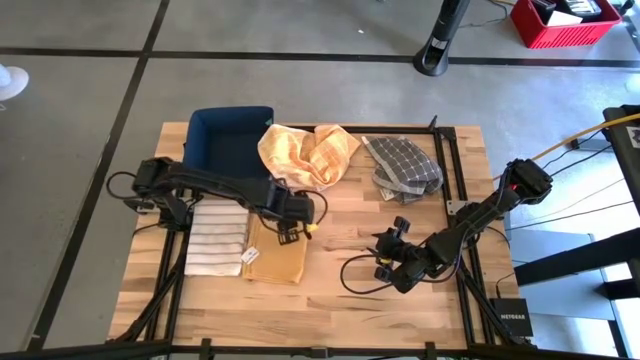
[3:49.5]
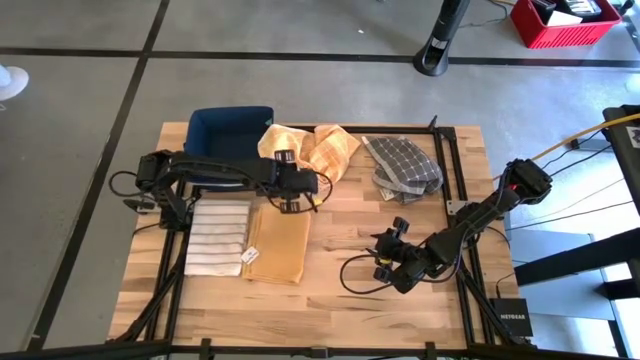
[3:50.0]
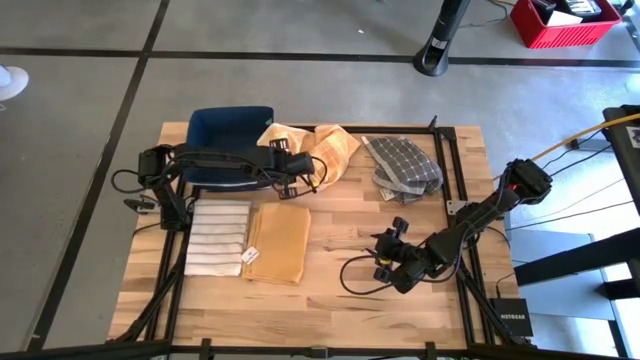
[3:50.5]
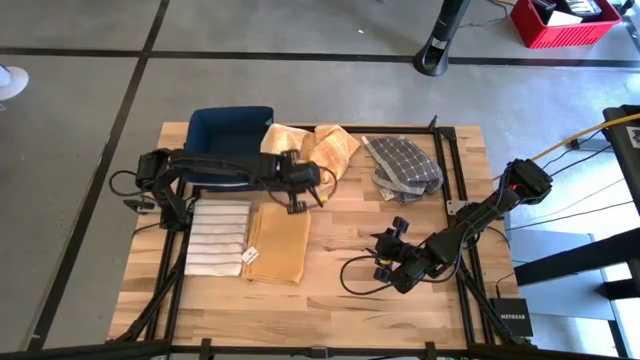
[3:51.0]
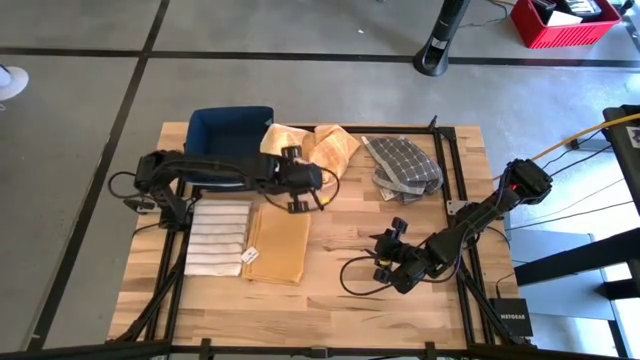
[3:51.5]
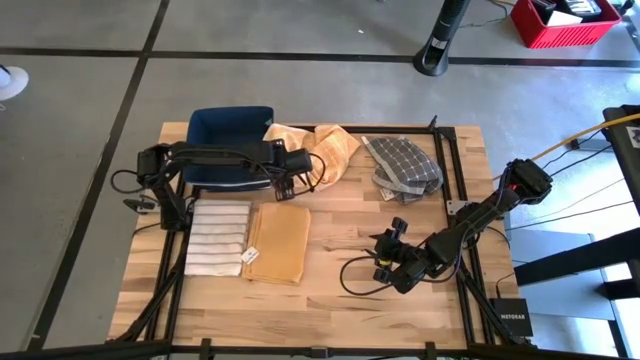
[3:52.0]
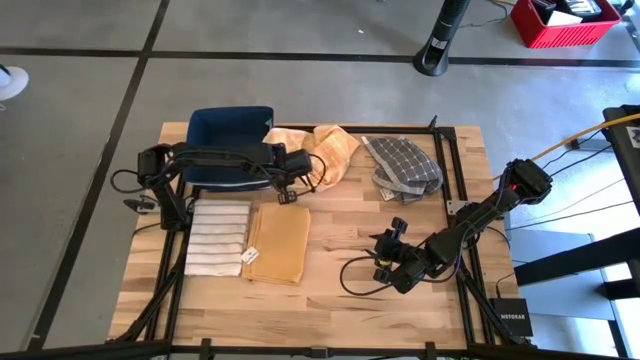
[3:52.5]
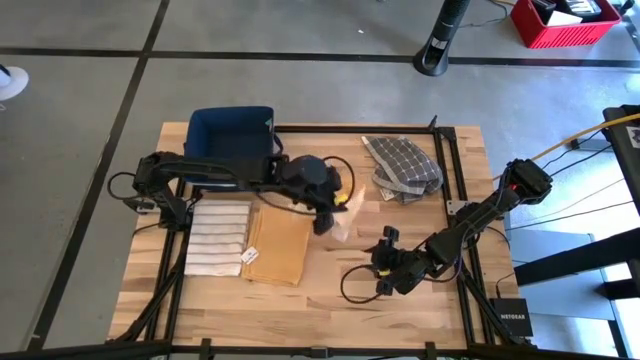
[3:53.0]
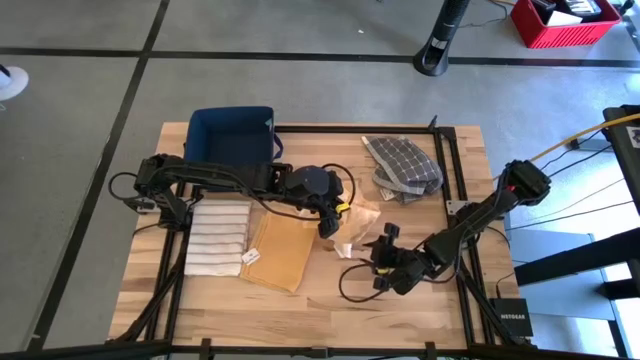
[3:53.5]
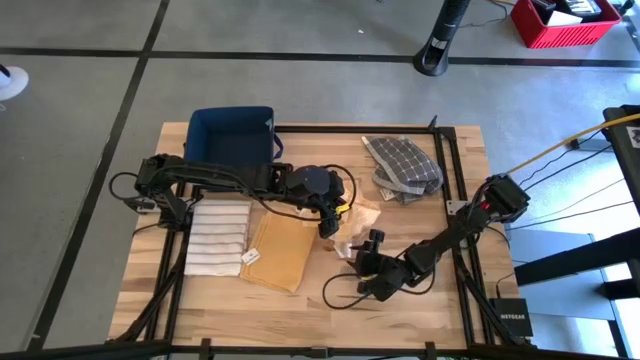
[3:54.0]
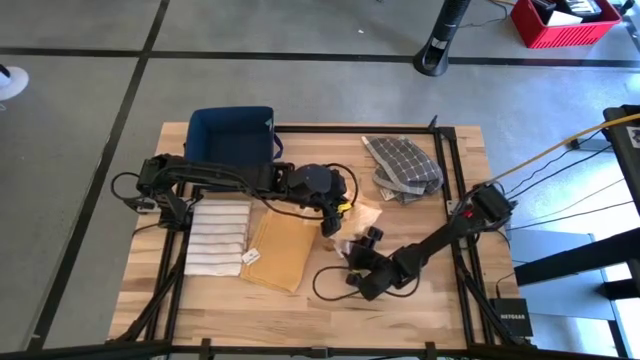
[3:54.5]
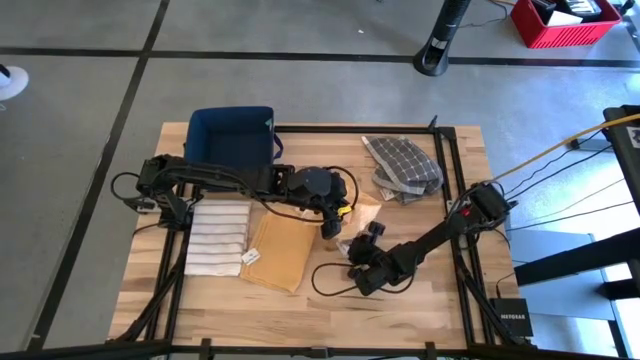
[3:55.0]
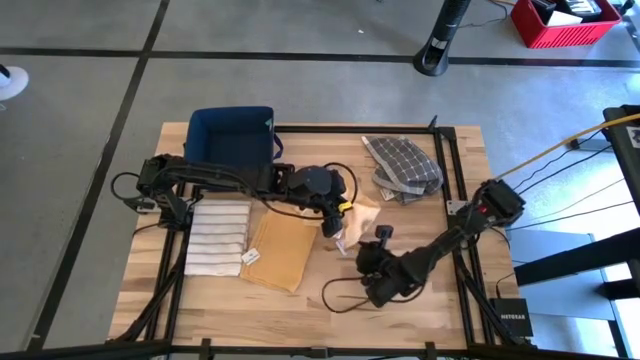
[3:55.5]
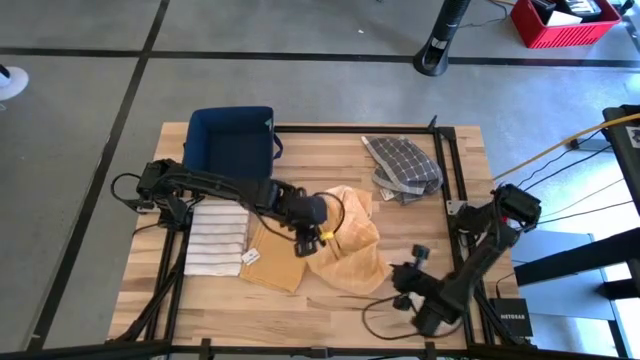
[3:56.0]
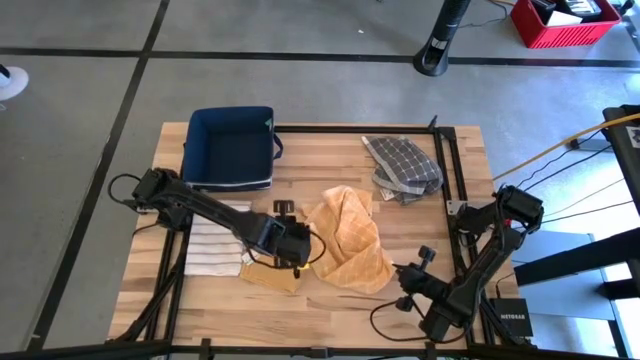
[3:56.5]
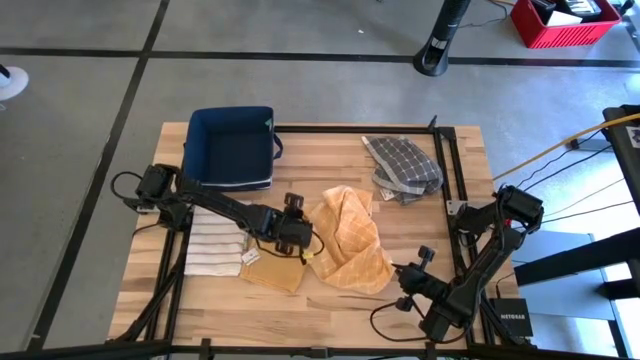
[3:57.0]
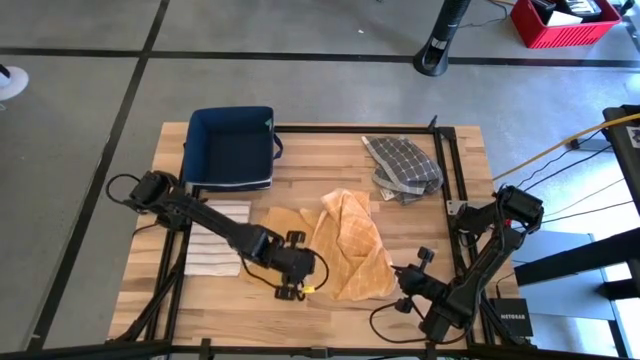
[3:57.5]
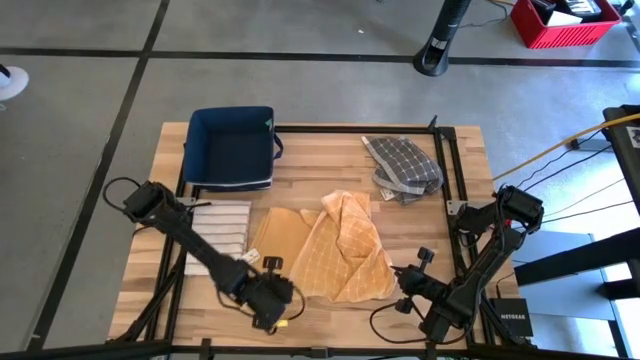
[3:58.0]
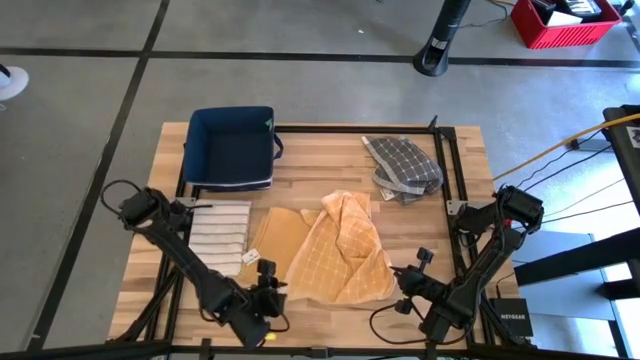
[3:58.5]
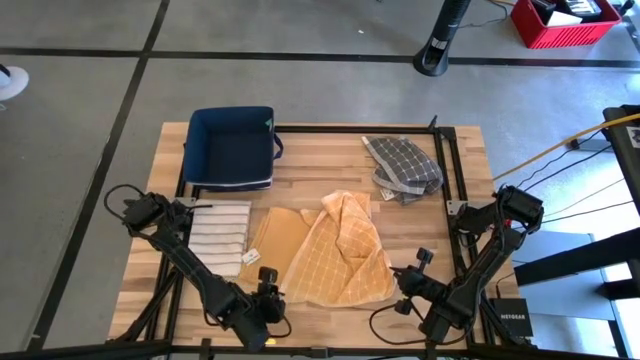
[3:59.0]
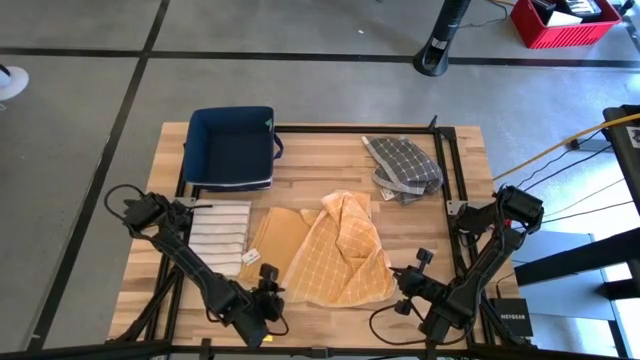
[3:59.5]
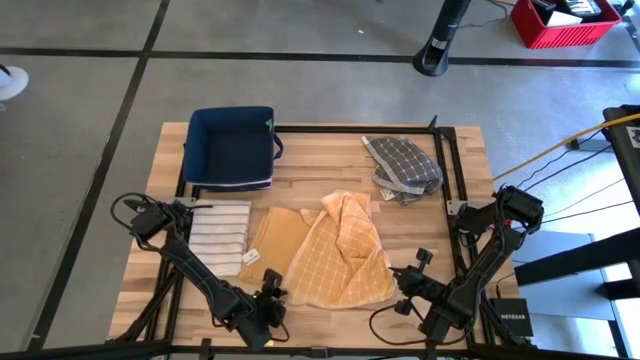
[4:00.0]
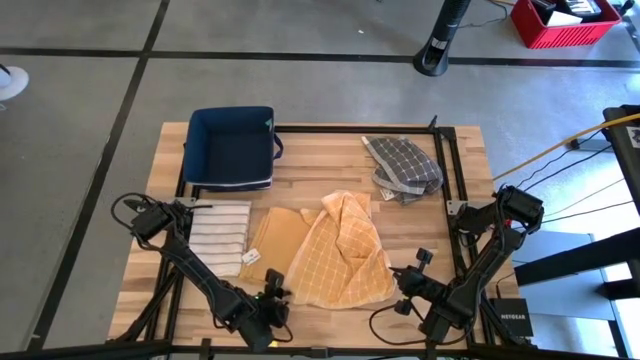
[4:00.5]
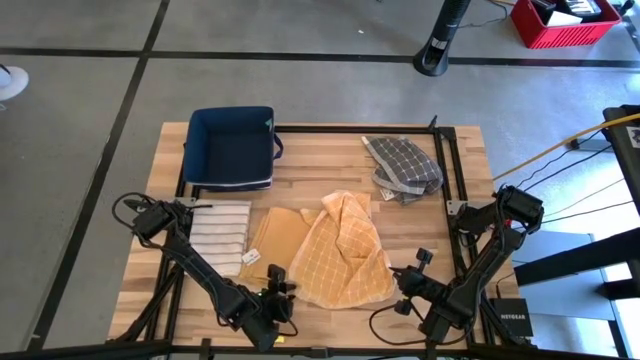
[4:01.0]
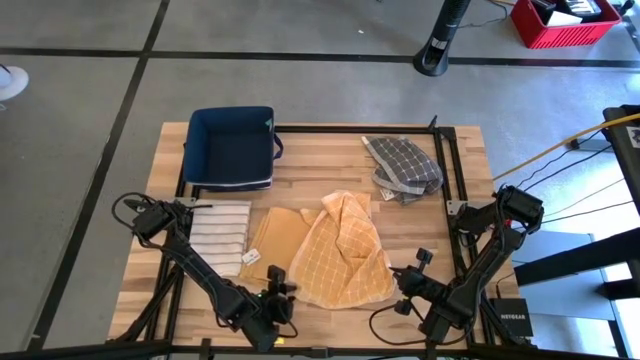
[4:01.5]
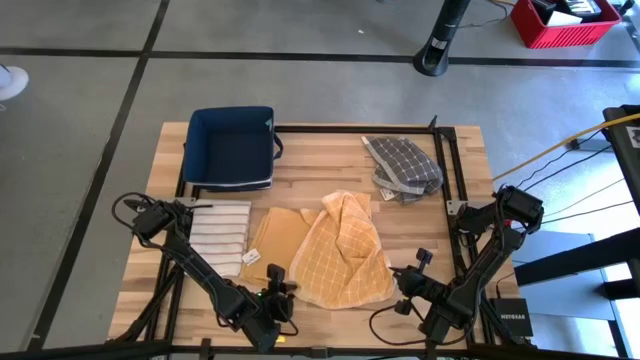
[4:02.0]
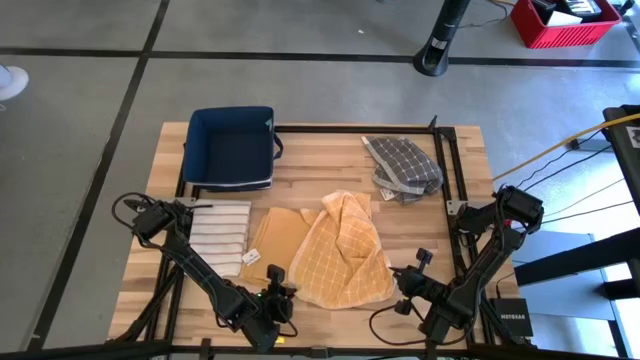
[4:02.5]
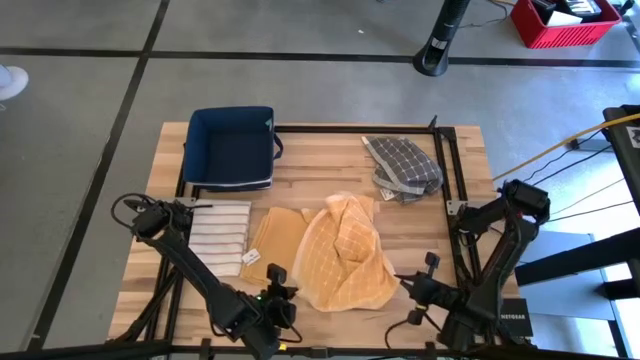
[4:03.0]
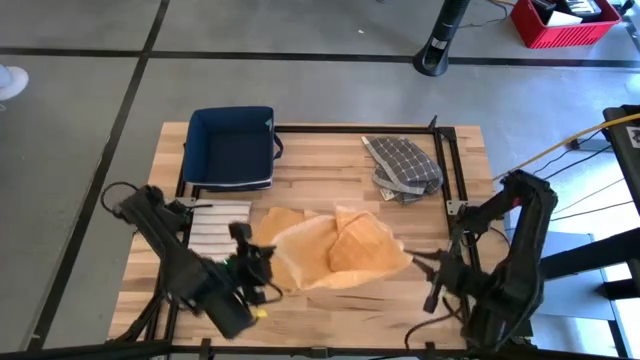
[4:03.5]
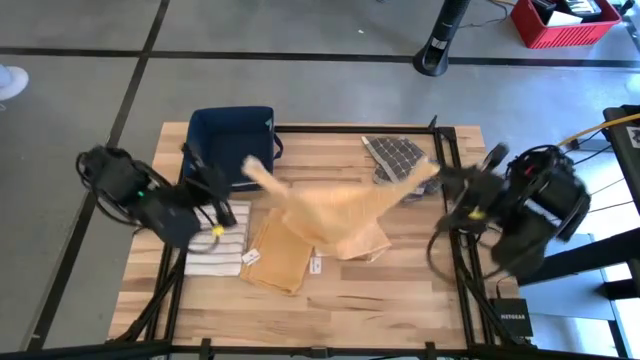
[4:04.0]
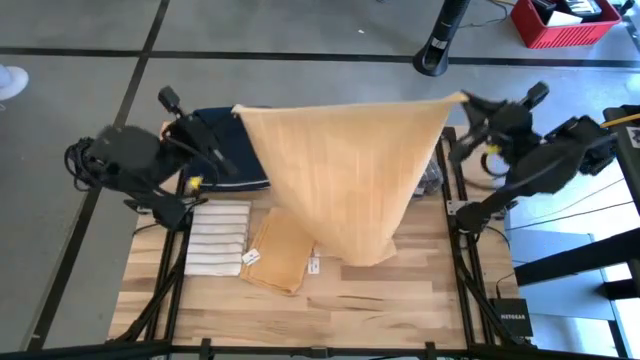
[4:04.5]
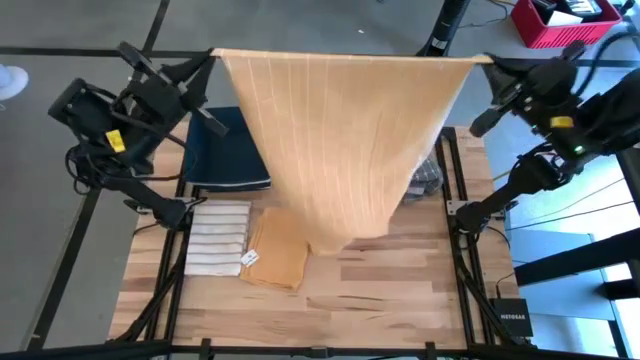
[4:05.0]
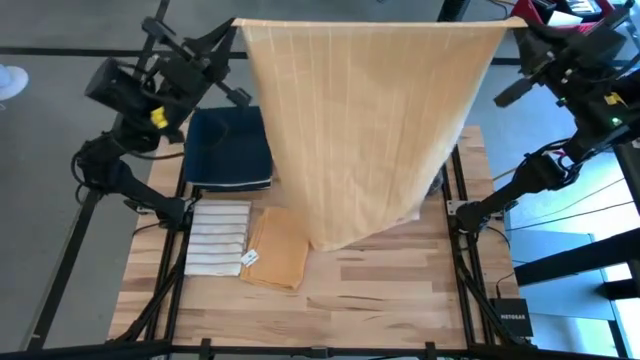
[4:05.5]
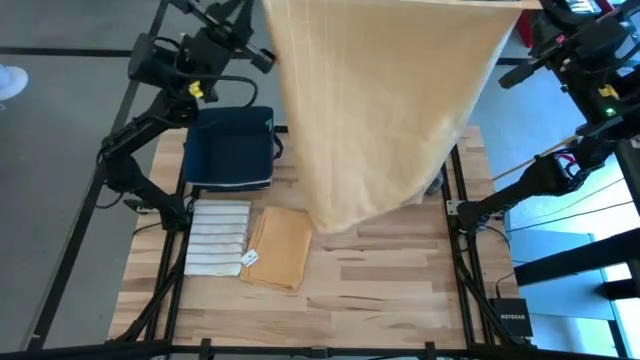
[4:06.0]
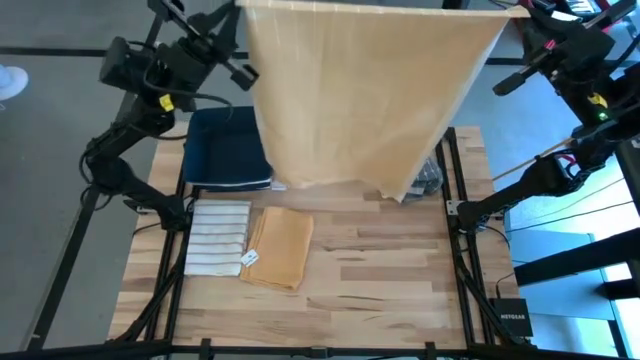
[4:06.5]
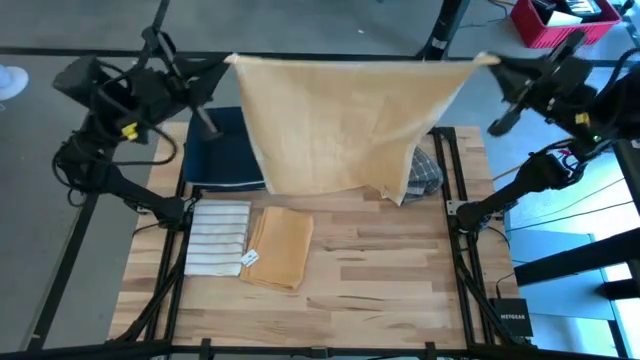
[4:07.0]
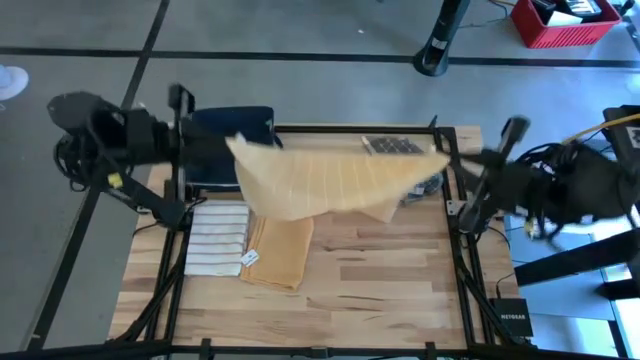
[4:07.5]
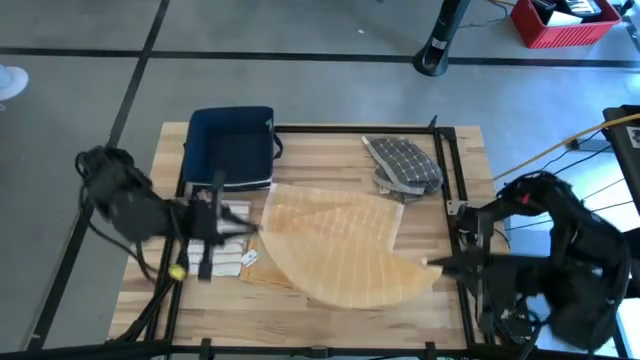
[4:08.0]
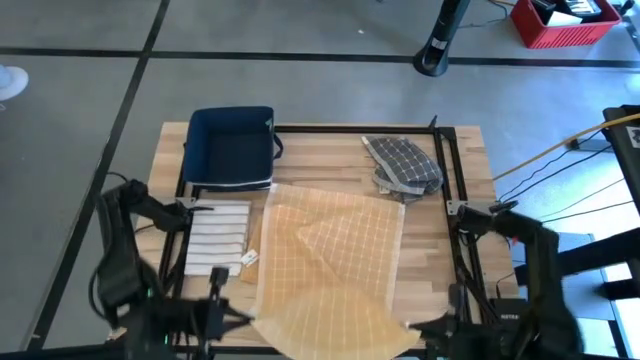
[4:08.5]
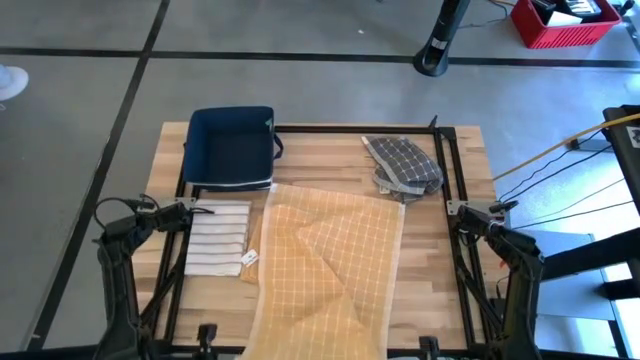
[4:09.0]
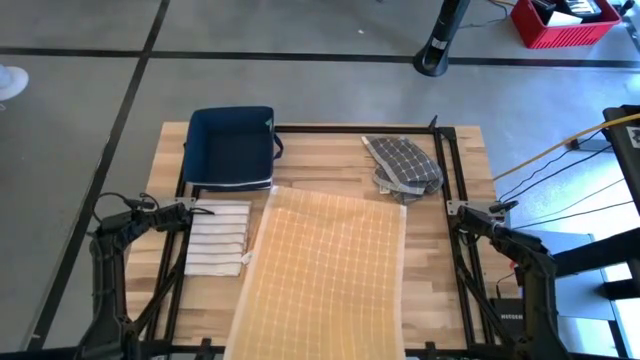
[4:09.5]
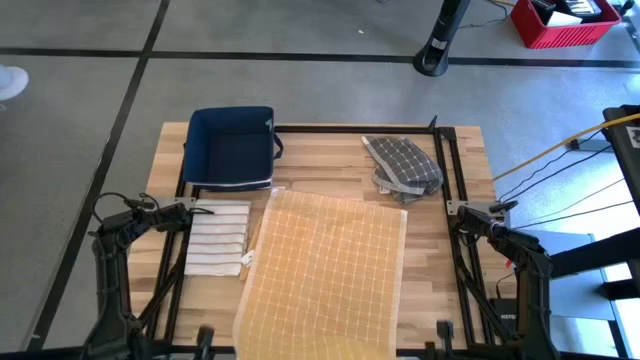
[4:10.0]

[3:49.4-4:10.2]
Task: Fold towel
Fold the orange pattern towel
